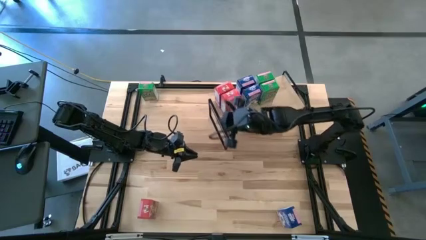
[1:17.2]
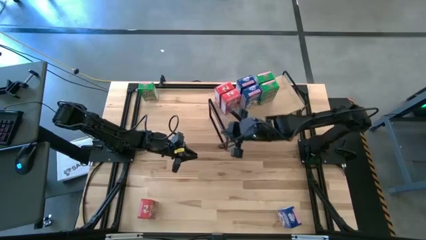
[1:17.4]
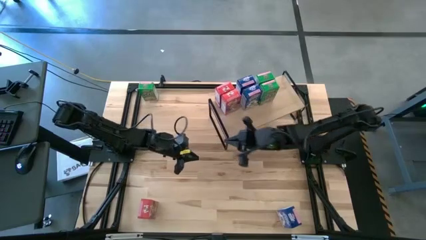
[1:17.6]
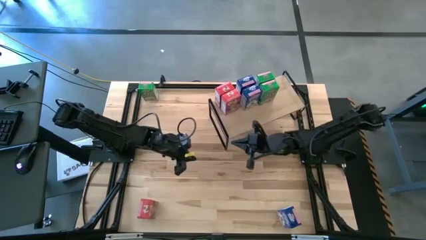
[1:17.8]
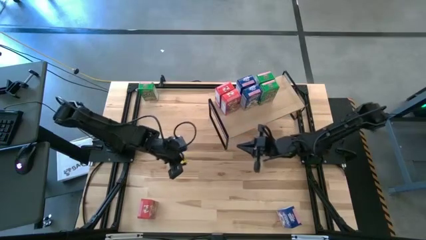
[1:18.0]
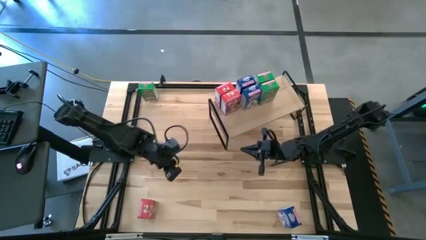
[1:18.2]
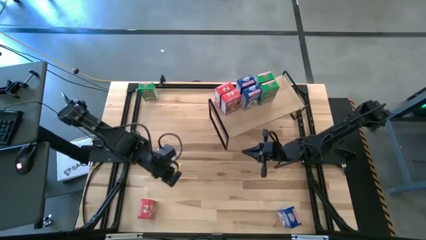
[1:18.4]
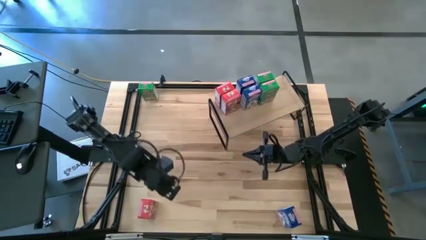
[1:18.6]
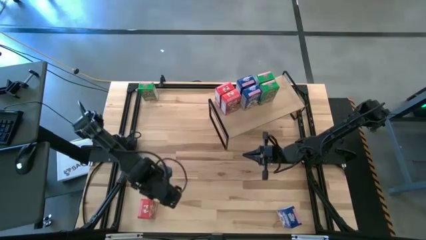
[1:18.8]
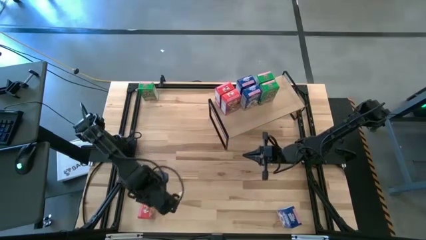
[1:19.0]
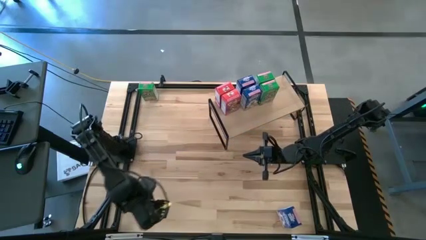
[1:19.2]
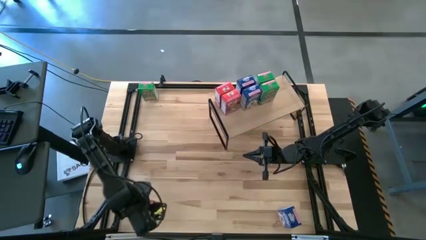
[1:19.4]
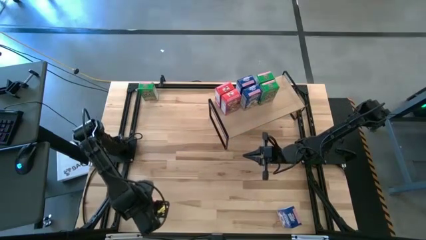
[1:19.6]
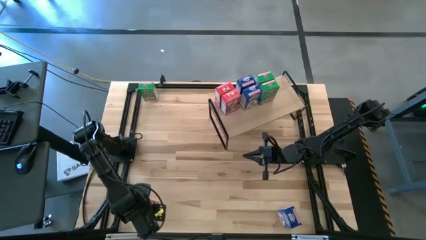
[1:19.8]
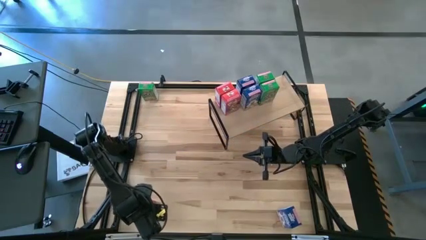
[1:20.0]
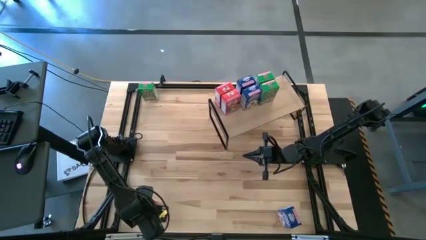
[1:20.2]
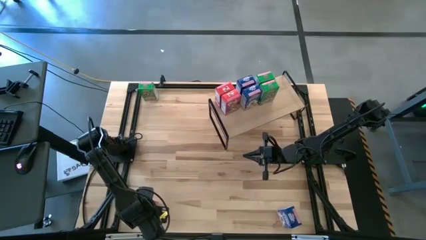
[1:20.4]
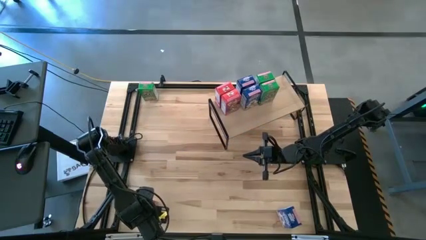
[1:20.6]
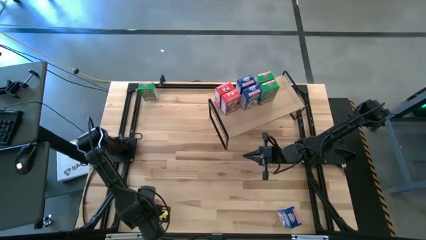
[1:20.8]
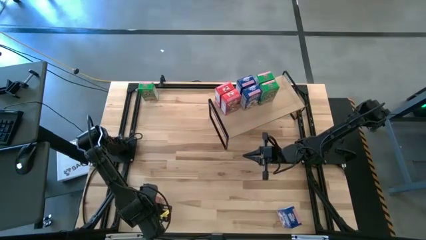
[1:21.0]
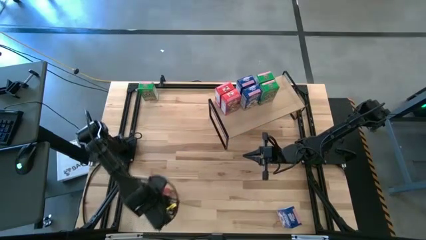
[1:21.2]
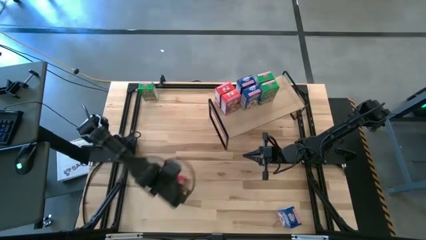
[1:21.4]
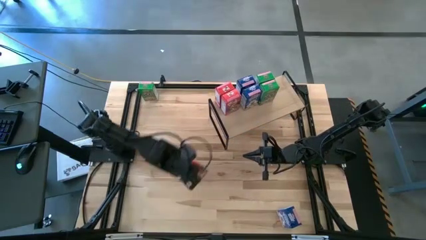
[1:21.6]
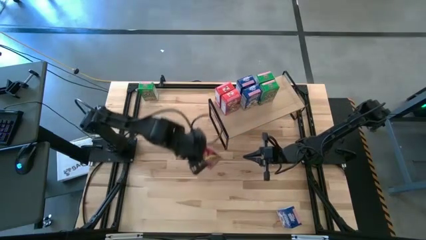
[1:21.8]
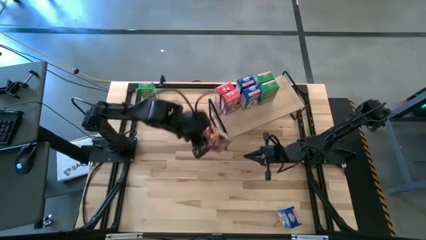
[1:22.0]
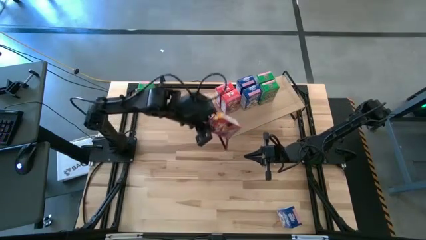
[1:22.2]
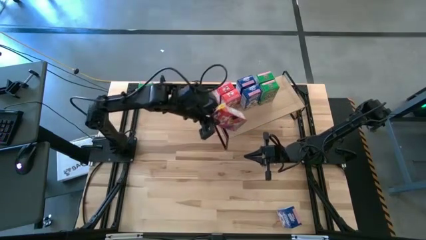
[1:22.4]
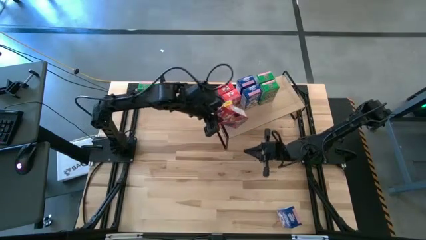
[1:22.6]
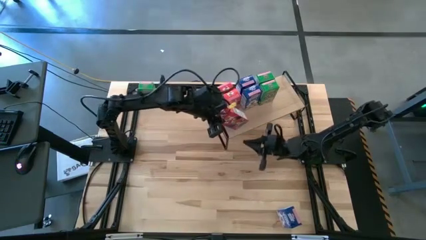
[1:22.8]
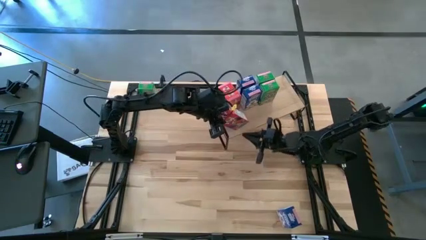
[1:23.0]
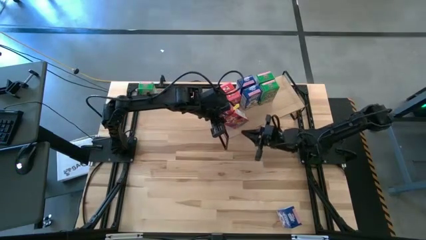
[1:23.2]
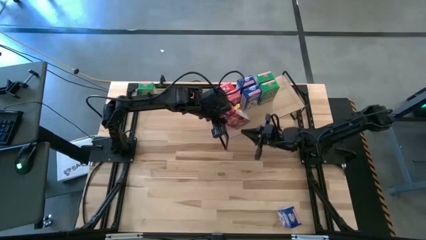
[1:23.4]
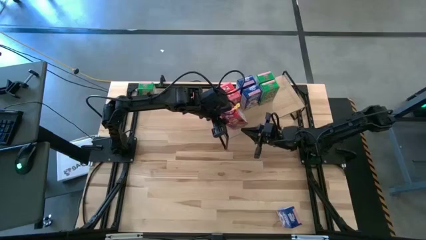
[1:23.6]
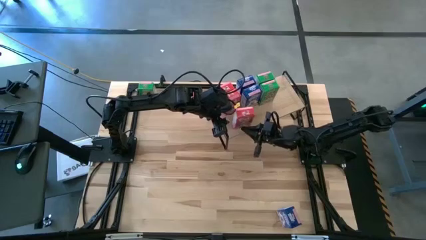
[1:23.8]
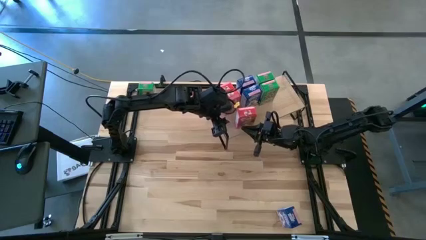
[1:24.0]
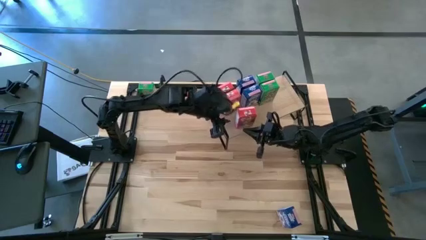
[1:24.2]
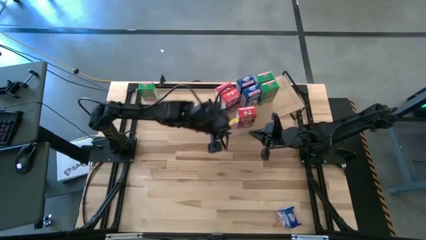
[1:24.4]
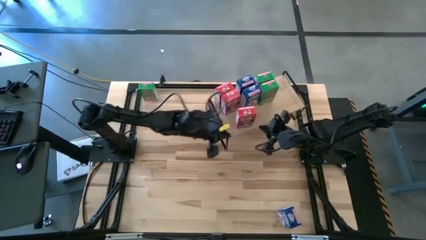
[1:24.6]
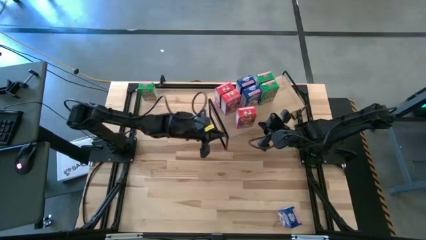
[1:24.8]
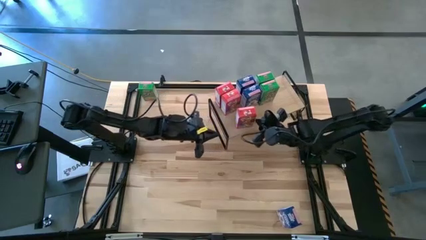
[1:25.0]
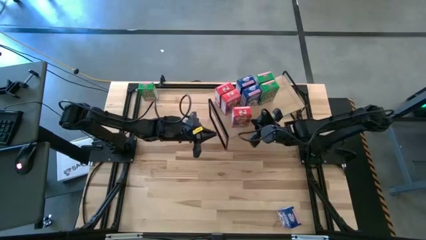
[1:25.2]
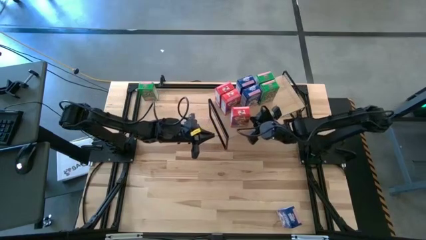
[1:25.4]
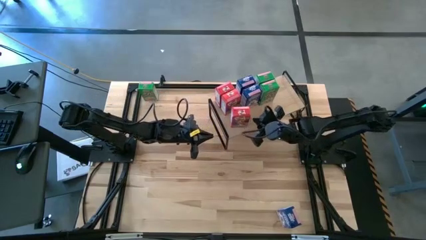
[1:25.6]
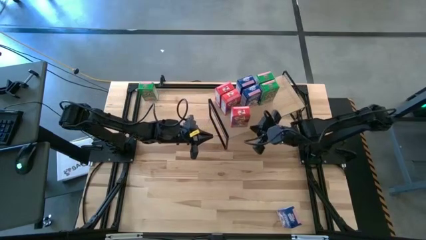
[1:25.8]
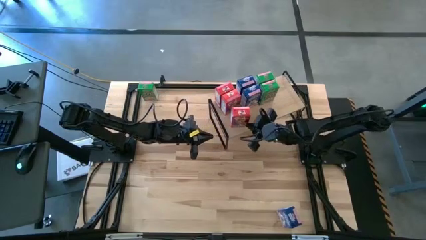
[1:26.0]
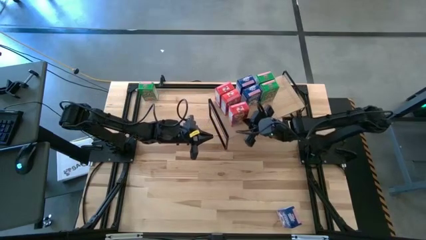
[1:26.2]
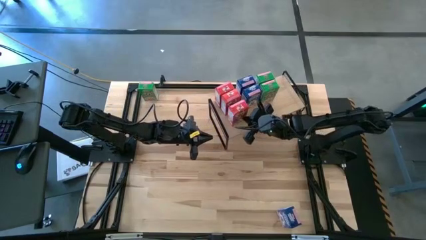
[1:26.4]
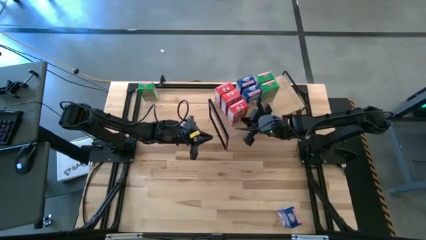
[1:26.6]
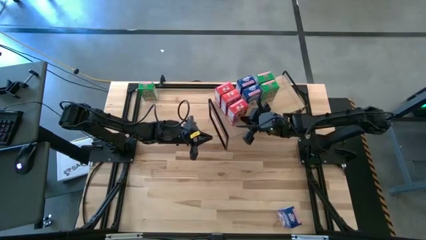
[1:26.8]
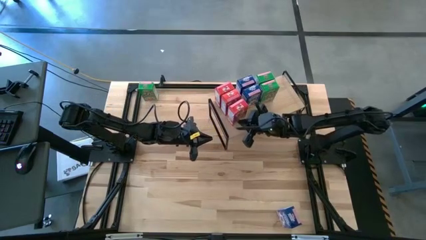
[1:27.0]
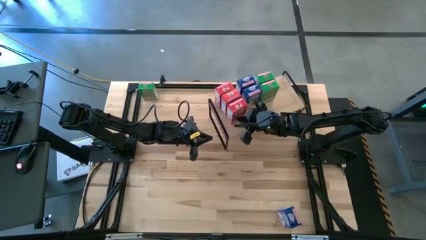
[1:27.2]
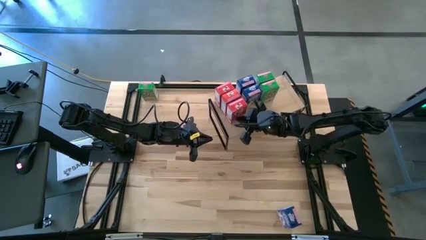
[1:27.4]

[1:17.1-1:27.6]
Task: Stack cereal on shelf
Put the red cereal box on the shelf aligned with the red cereal box

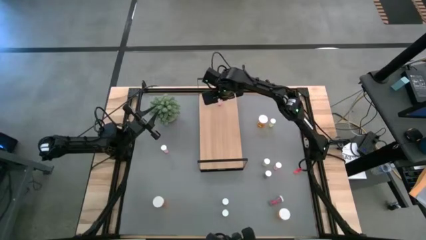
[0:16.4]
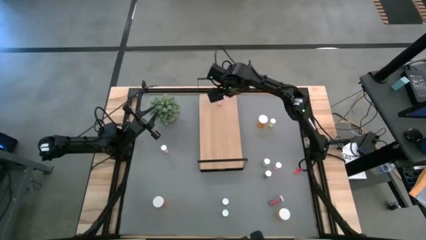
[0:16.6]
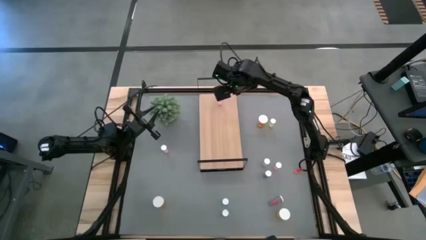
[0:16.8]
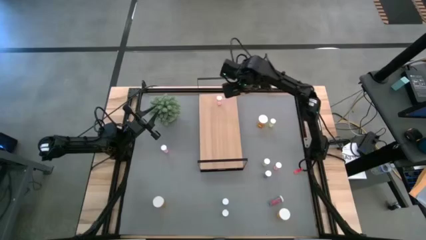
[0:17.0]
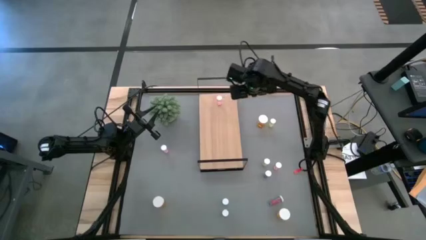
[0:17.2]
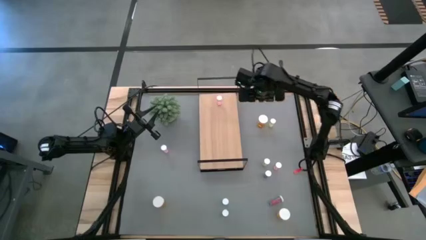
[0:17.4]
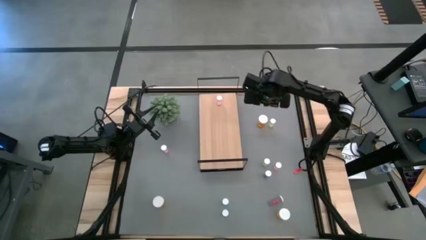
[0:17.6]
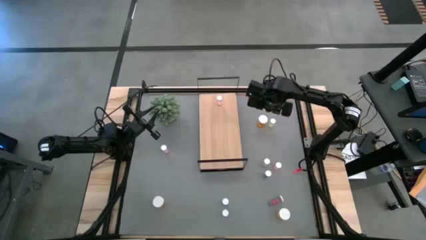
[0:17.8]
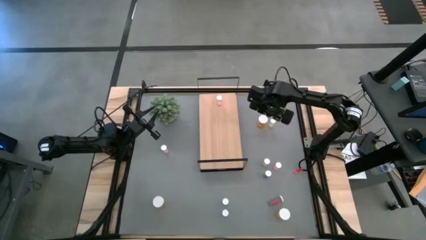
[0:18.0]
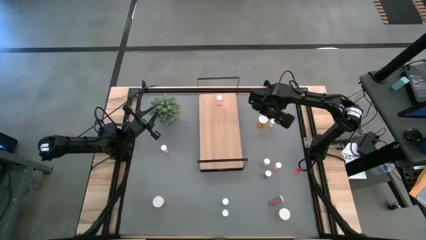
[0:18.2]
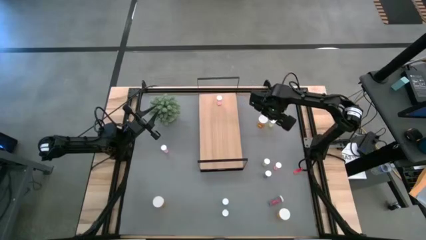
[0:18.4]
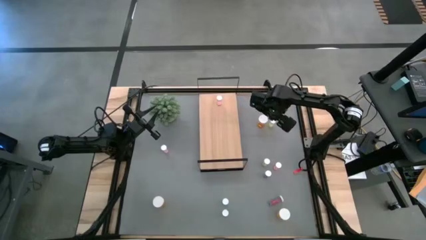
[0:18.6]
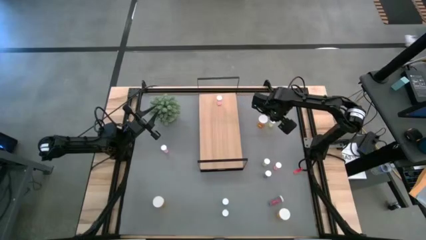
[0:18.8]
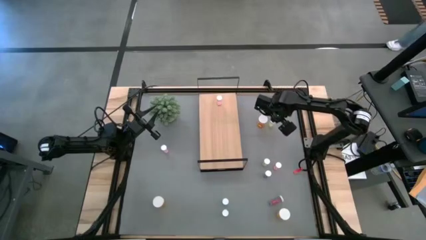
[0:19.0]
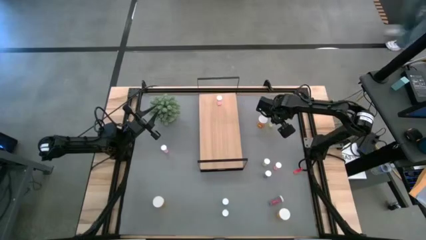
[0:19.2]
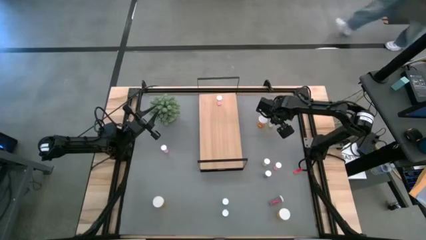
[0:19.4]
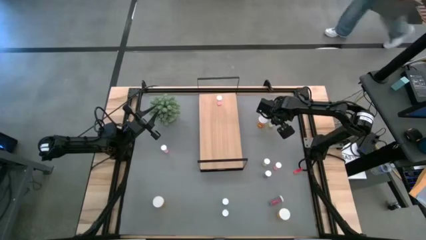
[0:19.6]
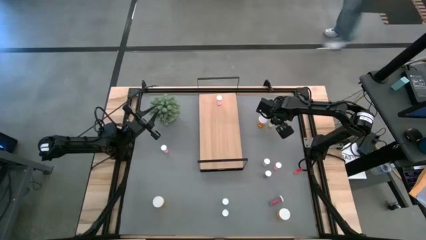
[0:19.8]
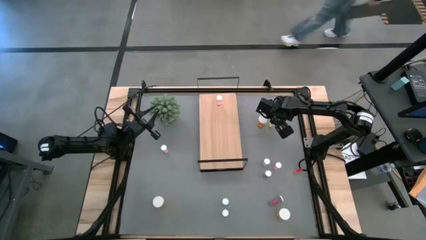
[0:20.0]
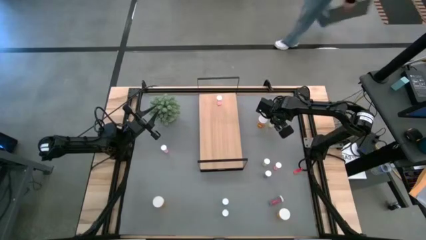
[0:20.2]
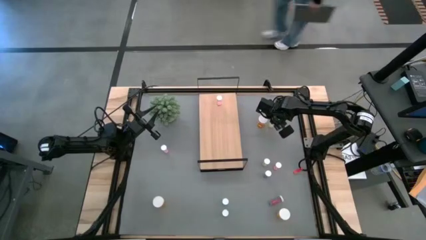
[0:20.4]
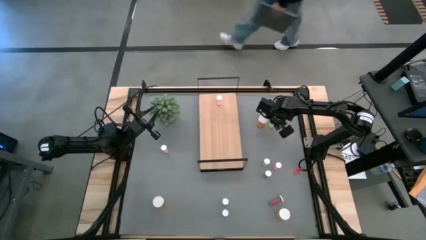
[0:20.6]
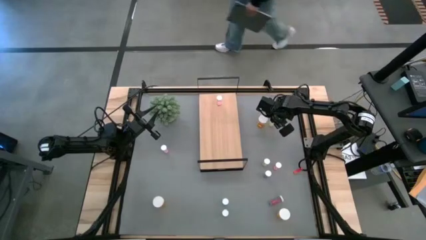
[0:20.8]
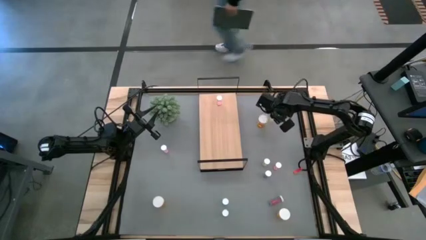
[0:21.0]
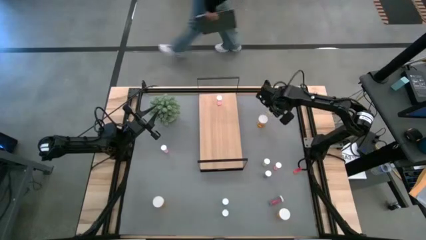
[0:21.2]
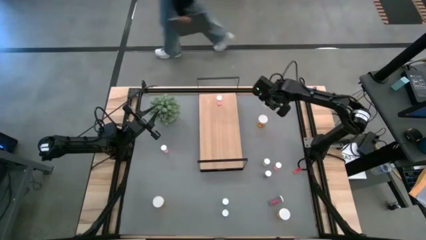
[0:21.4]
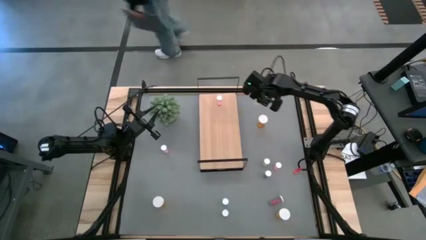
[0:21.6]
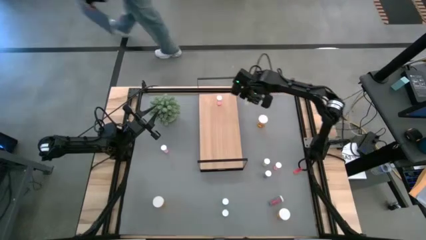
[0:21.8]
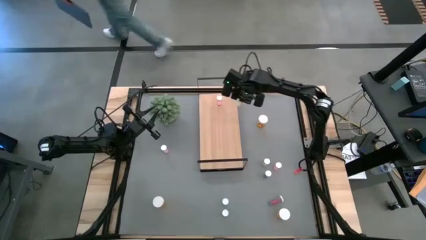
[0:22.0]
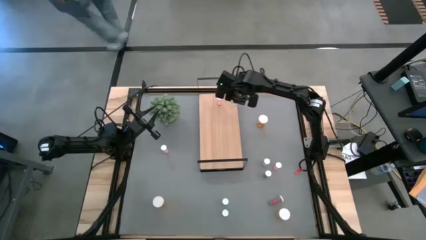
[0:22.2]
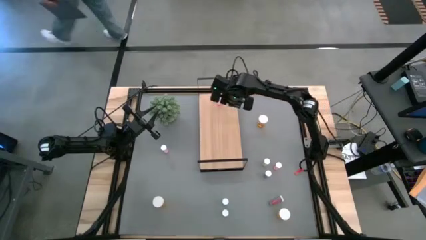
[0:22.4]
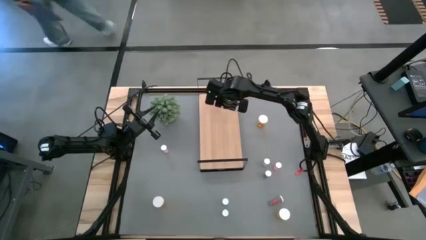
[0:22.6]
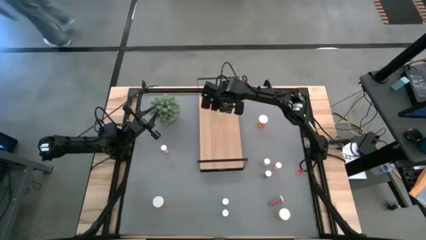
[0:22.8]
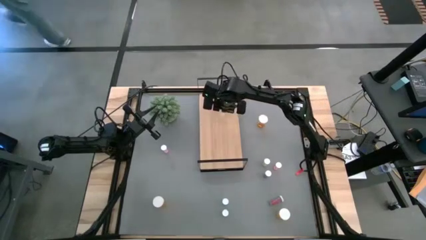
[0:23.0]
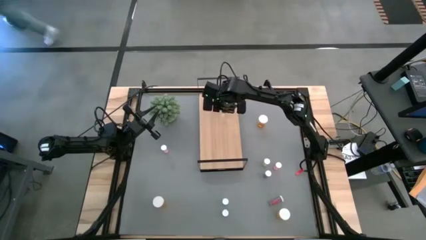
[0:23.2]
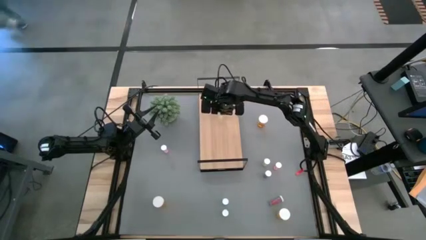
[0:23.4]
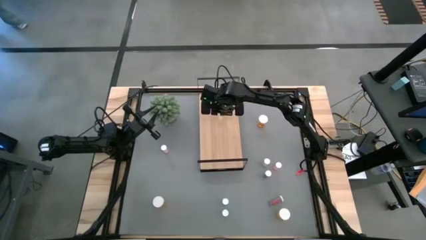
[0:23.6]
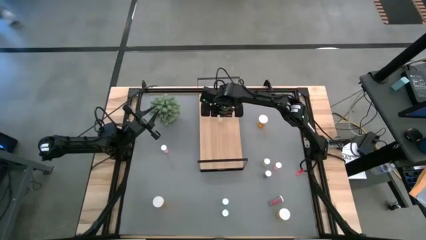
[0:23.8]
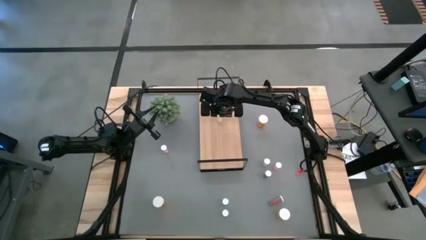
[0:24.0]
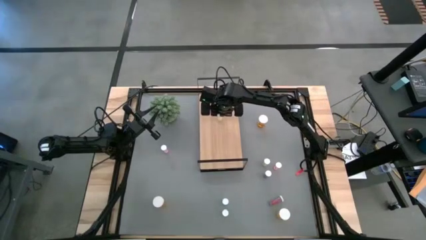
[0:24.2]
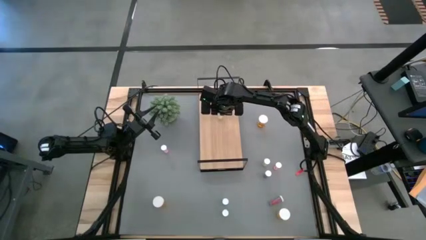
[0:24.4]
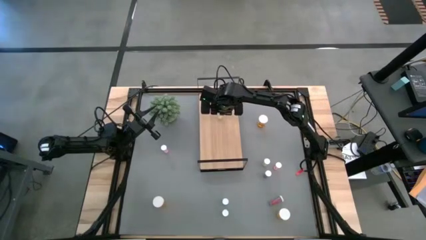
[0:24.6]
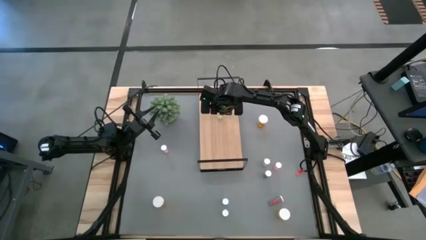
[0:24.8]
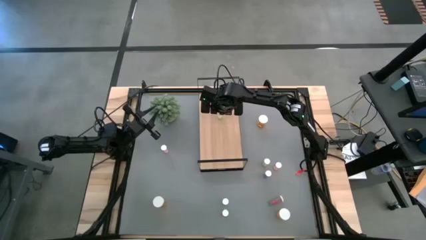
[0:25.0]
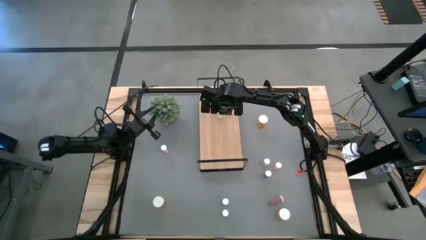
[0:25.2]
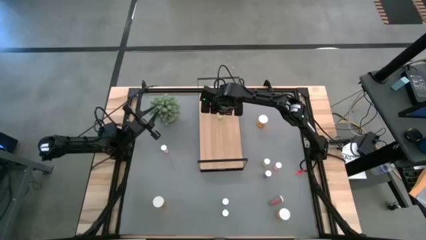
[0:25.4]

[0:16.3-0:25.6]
Task: Pick and place medicine bottles onto shelf by color
Put the top yellow pill bottle on the shelf
